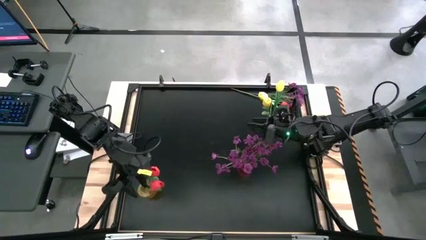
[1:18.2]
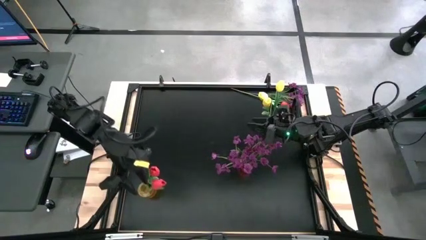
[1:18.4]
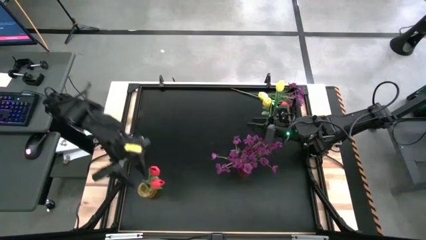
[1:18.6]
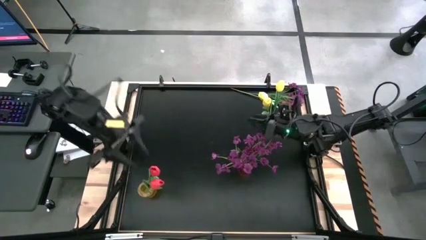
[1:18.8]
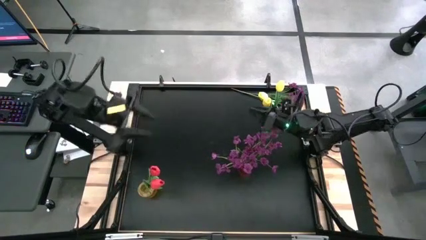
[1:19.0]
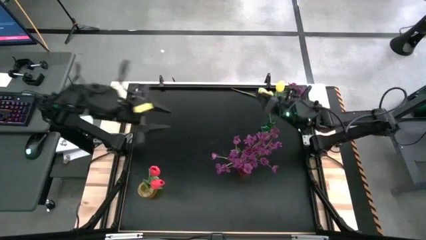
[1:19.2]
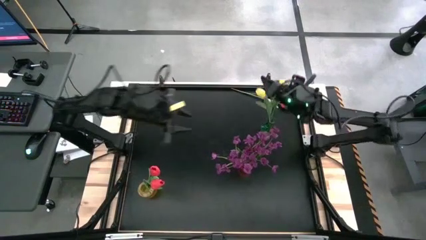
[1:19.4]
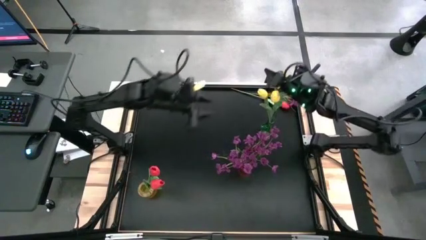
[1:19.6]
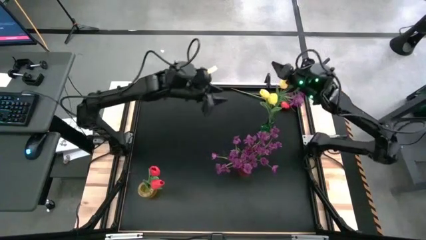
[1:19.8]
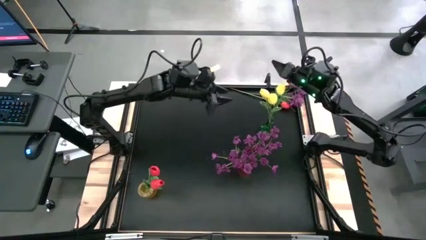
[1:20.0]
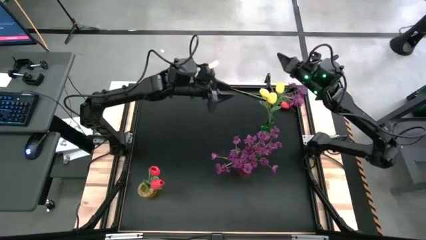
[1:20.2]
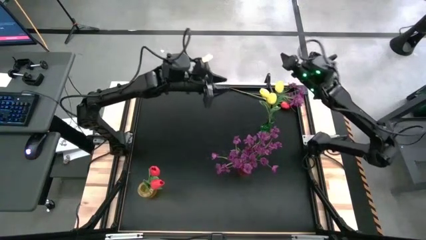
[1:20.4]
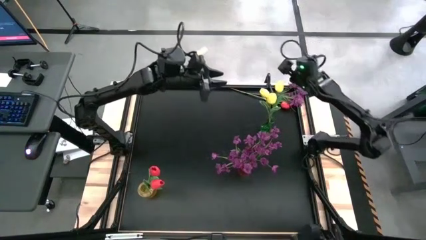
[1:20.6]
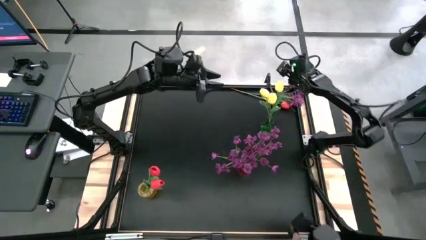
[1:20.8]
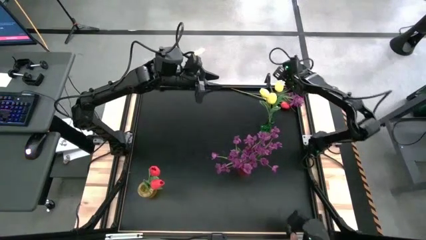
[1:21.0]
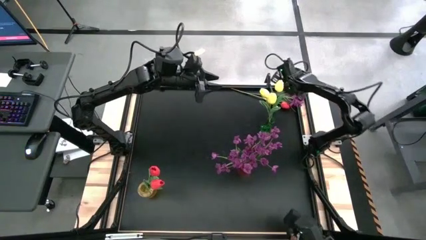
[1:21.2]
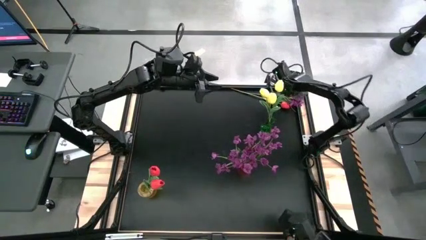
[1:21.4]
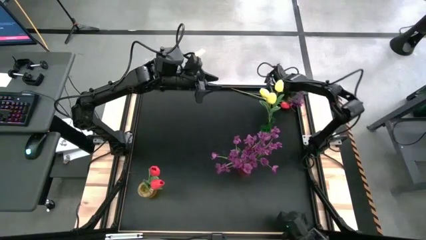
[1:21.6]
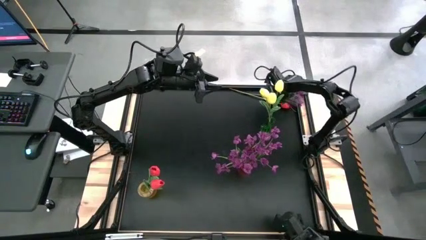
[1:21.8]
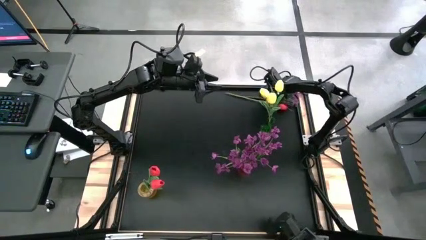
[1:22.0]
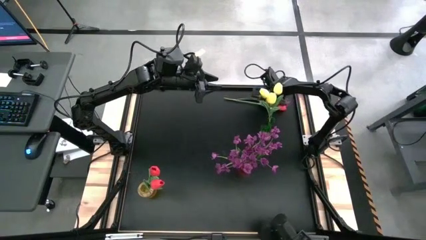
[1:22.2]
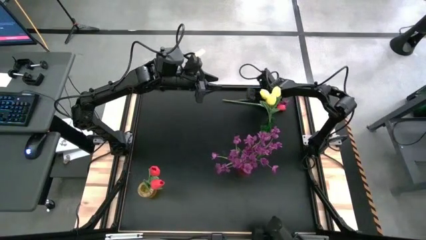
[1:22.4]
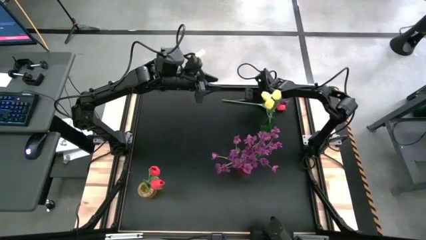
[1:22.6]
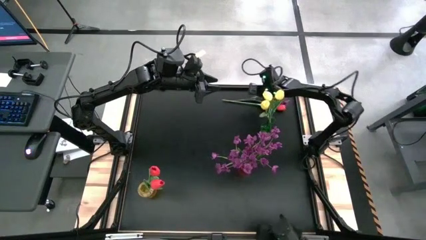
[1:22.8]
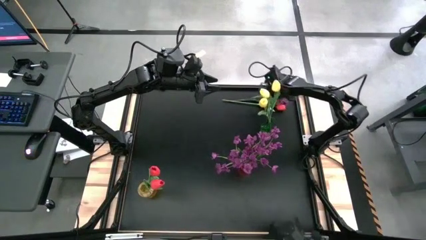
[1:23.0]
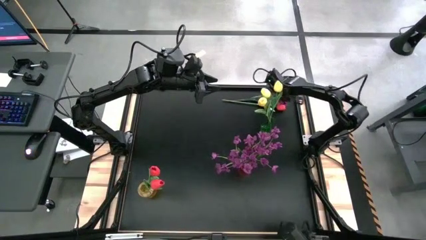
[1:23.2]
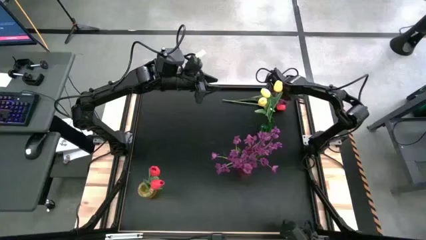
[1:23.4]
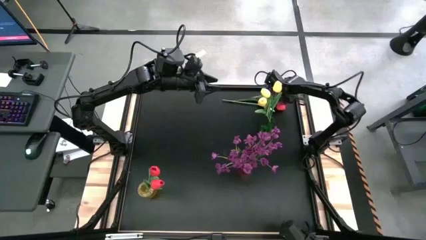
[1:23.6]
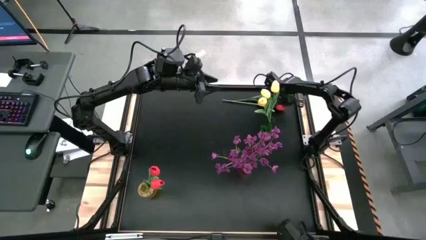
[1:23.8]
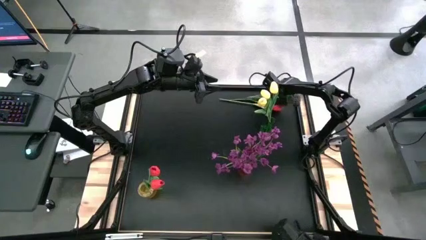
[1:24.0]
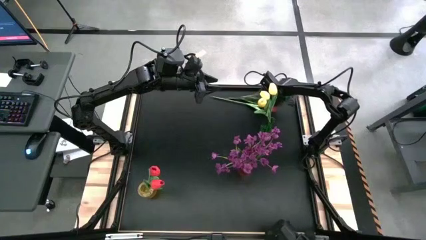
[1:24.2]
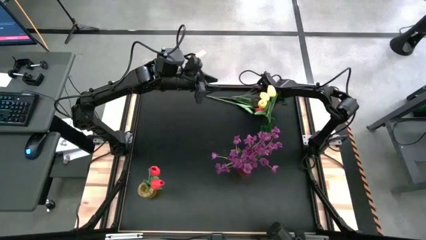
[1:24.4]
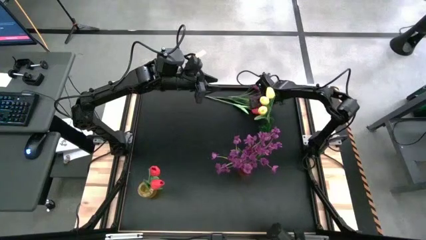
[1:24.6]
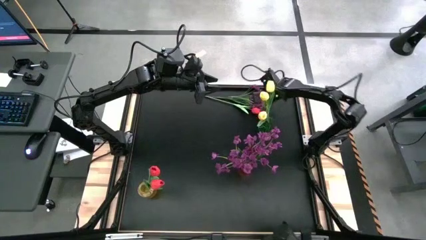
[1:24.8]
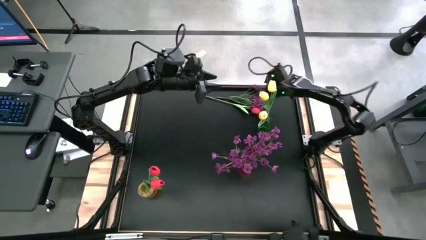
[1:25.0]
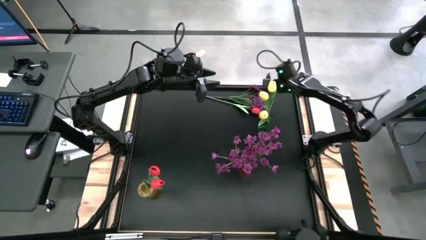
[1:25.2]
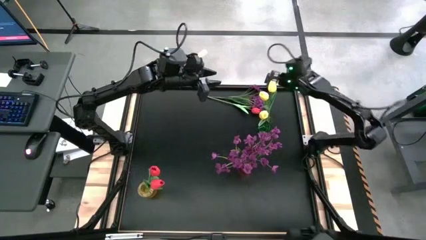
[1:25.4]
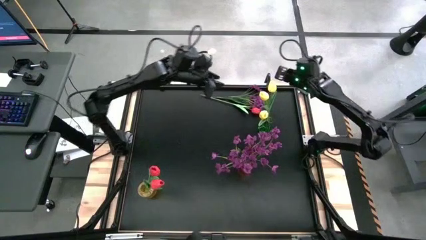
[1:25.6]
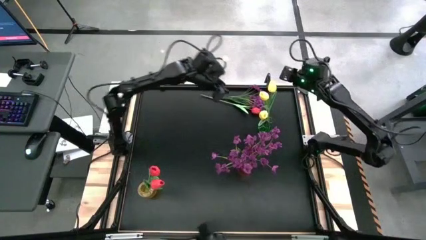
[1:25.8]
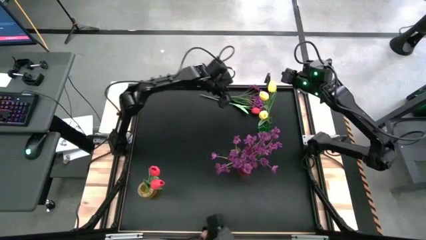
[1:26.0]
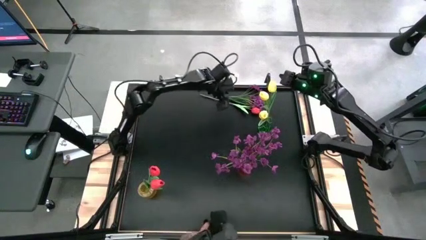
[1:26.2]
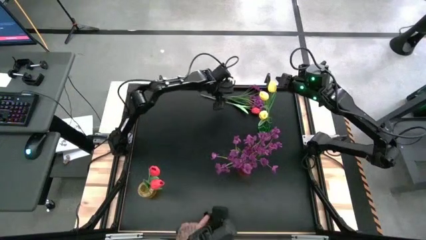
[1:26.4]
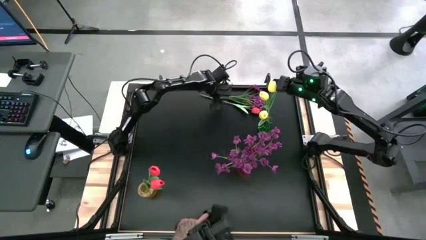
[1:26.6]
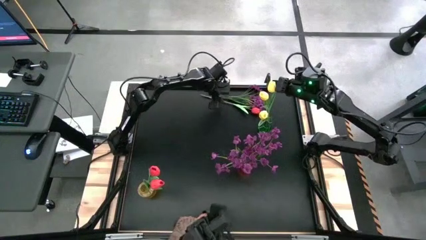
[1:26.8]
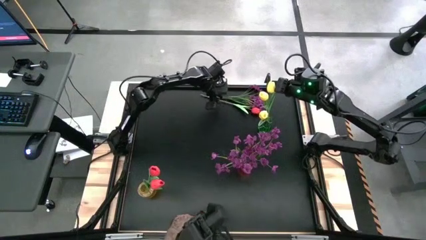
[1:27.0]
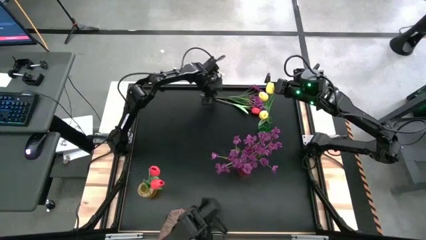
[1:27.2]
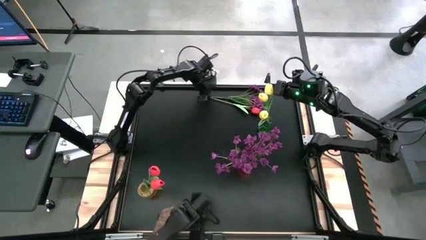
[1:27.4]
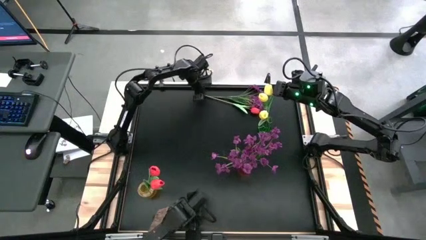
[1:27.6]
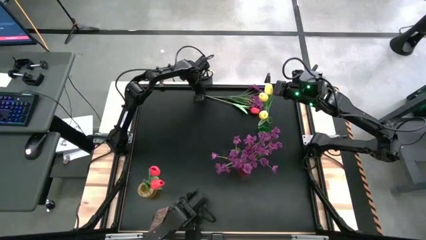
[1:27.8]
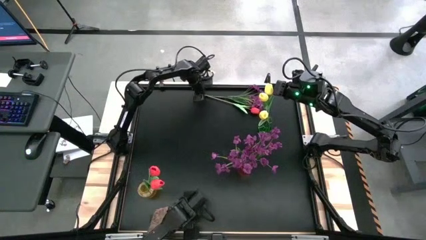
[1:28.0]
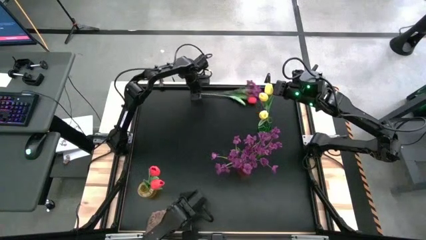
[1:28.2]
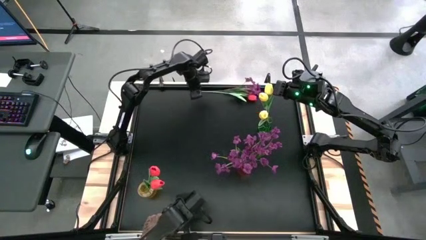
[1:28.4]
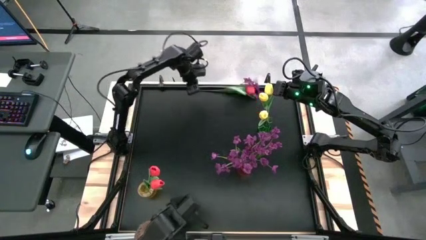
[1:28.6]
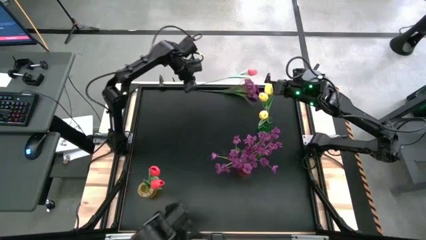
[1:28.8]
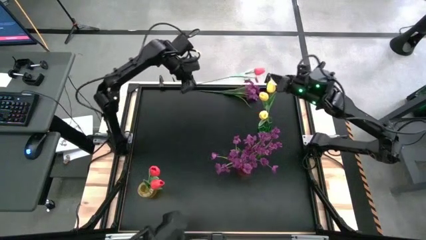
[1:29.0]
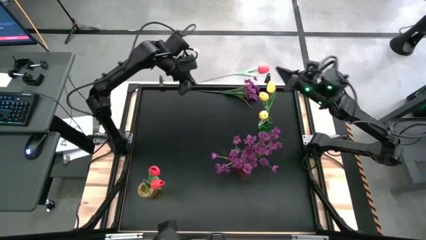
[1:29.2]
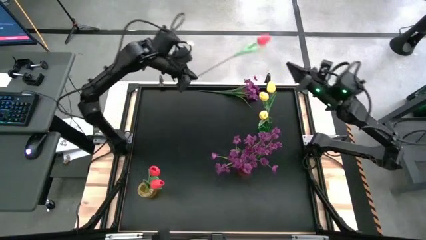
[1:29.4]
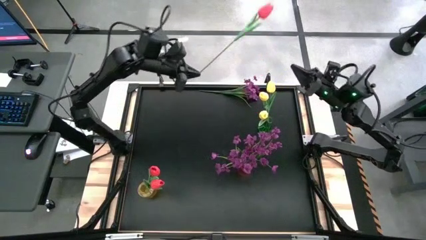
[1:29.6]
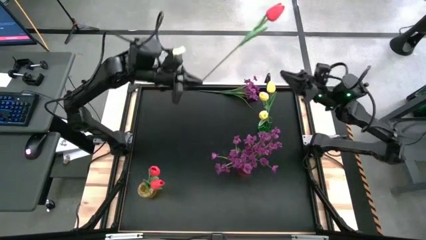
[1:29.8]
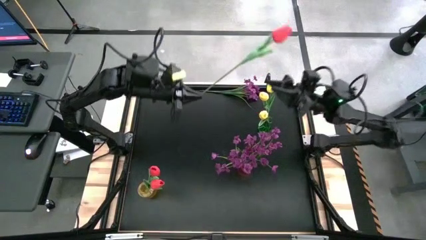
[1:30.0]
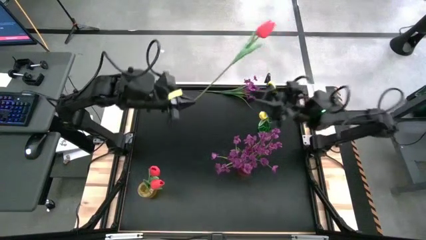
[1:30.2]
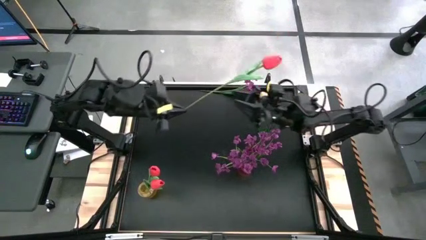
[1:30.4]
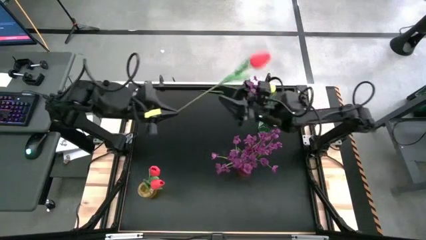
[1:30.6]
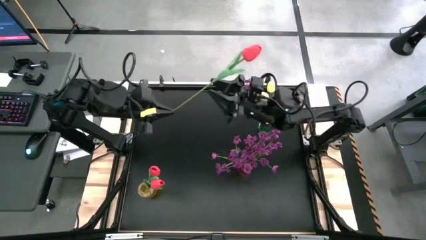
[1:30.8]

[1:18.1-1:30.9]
Task: Sort flowers into vase by color
Put the pink tulip into the yellow flower vase
